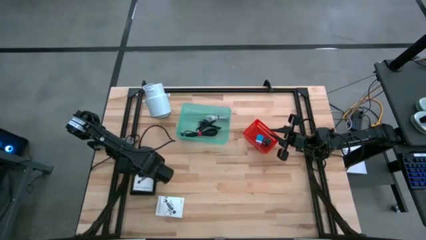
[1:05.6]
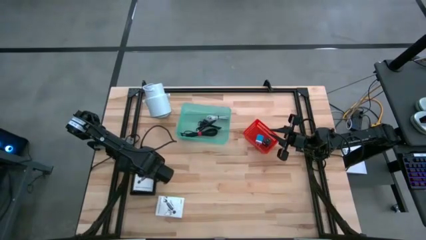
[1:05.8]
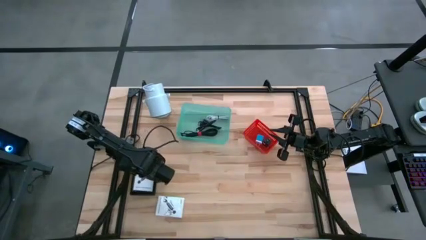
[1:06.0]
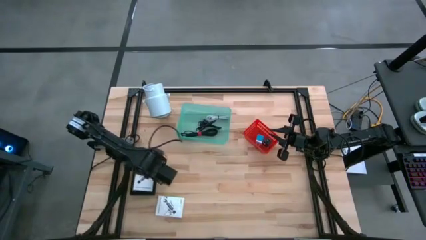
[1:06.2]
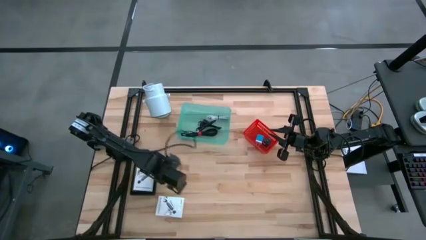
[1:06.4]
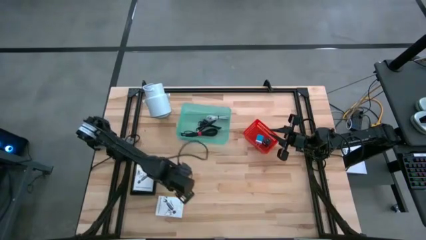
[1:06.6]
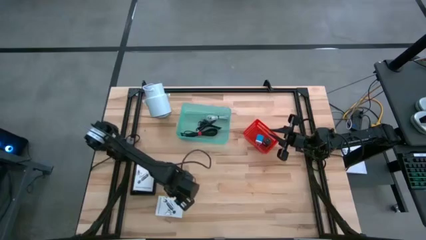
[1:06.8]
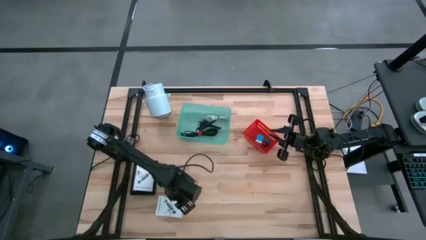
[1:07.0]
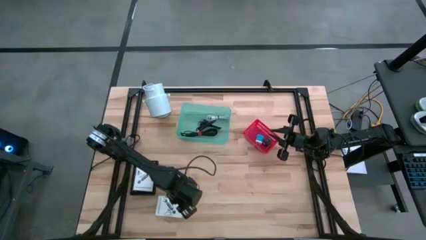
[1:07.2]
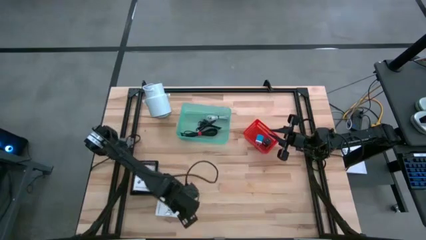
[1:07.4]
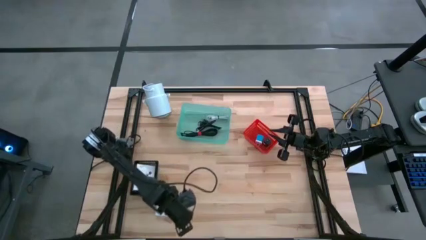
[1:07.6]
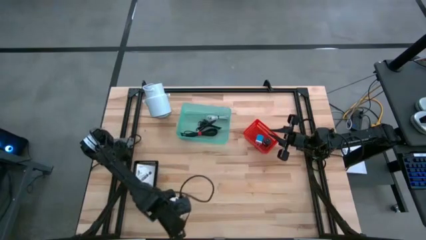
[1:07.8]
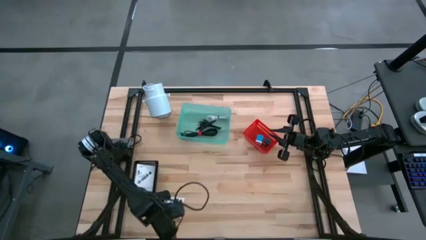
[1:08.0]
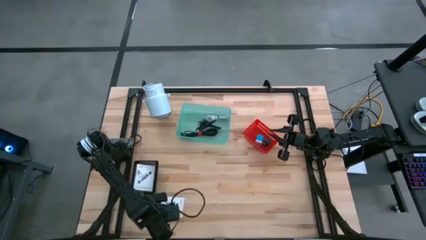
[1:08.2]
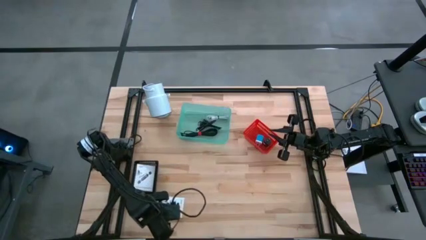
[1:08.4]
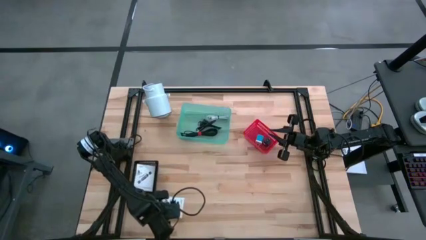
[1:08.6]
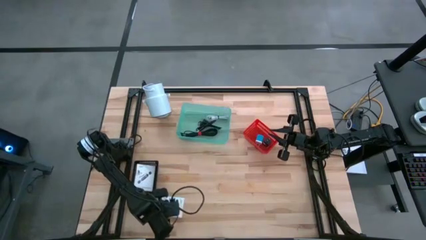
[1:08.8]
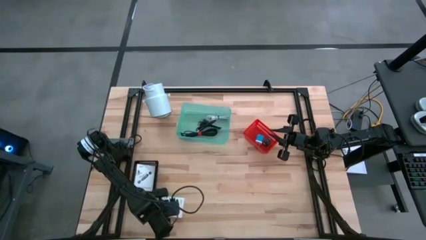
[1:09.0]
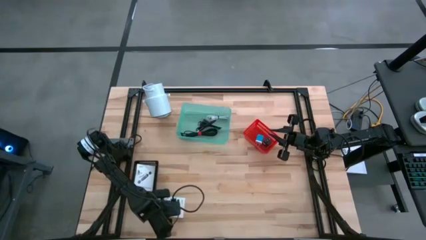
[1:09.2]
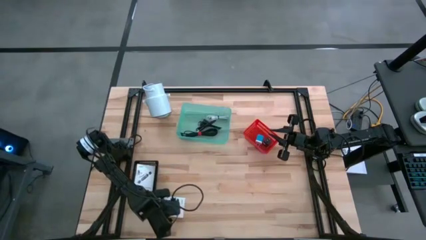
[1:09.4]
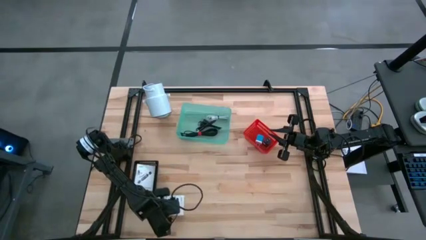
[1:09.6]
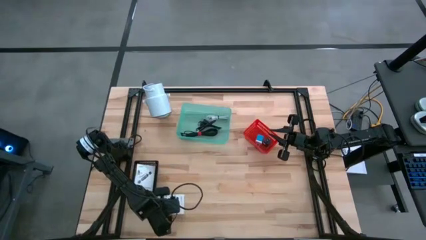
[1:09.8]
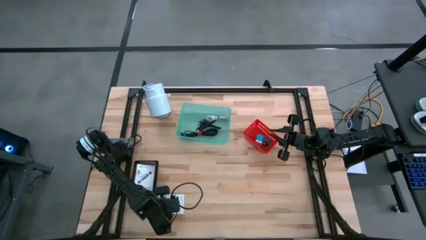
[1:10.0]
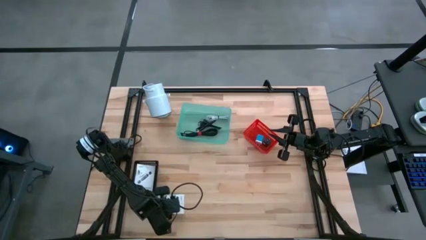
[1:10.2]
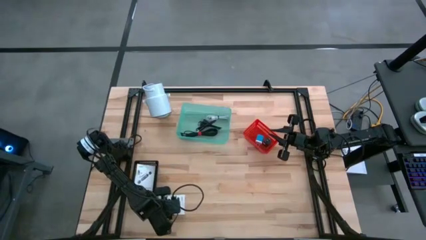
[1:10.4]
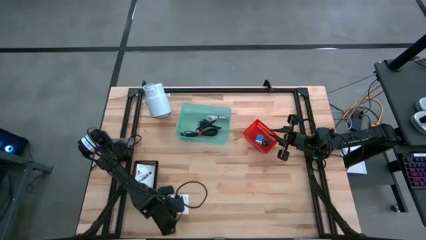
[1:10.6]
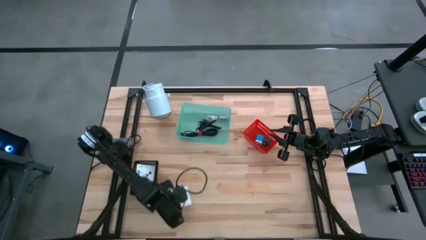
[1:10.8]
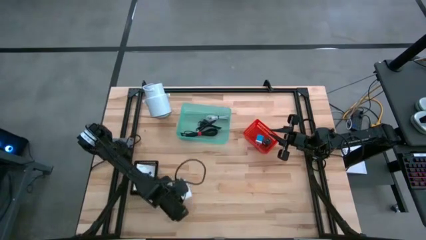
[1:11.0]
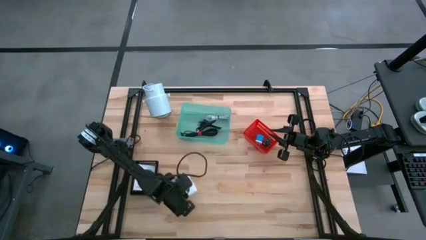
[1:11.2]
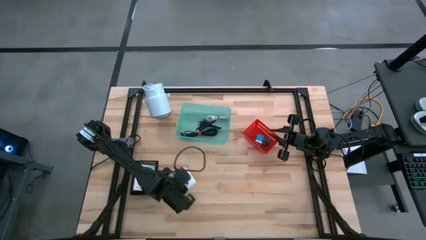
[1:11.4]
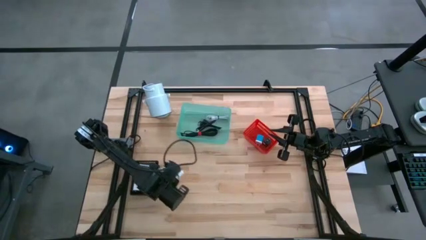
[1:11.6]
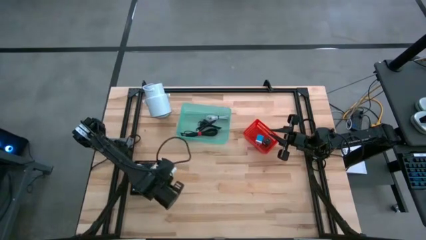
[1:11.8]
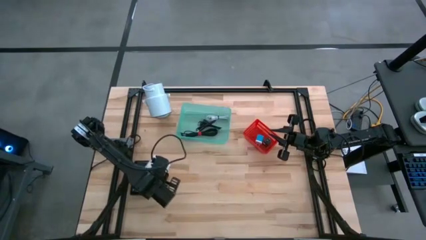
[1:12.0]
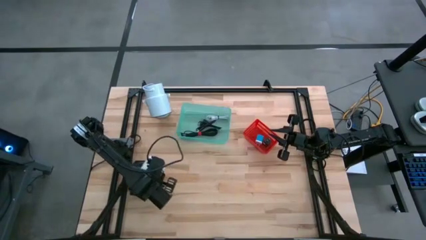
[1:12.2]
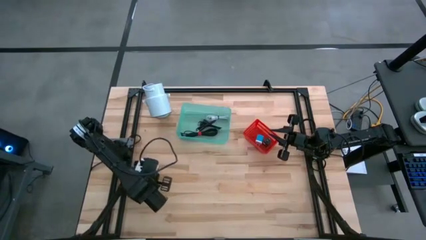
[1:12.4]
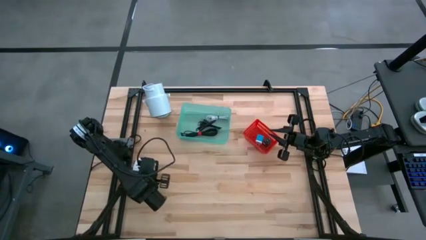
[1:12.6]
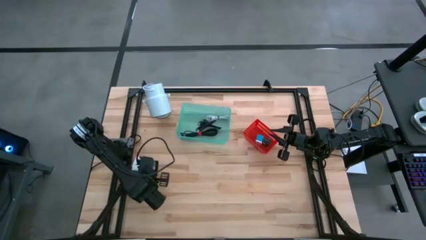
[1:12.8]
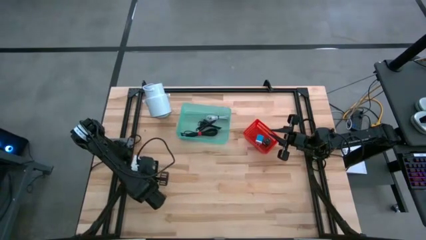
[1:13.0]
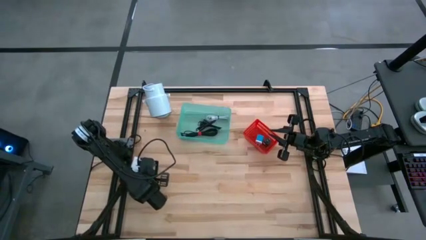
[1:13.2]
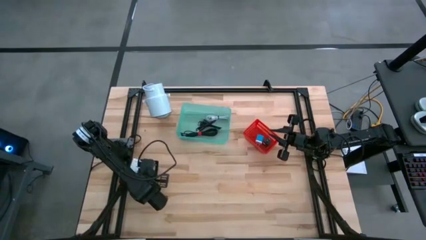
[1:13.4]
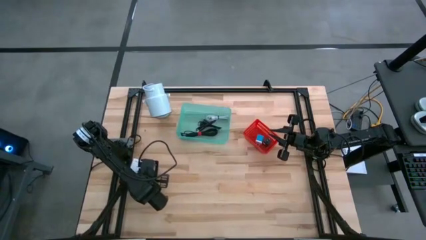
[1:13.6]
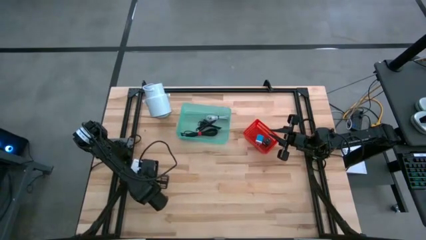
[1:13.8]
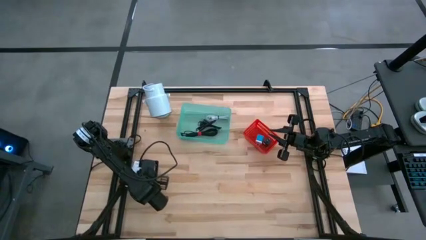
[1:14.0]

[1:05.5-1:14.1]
Task: Pick and place items into bin
Put the card reader box into the black bin

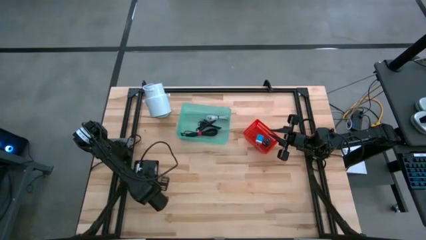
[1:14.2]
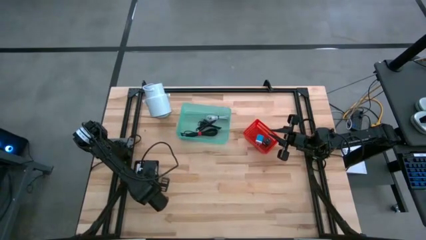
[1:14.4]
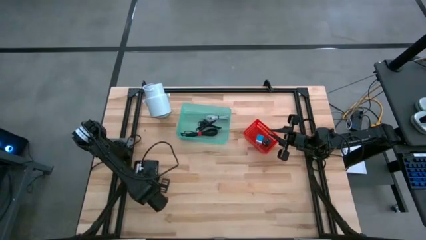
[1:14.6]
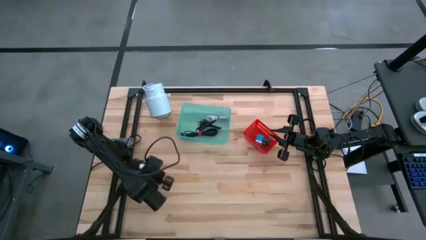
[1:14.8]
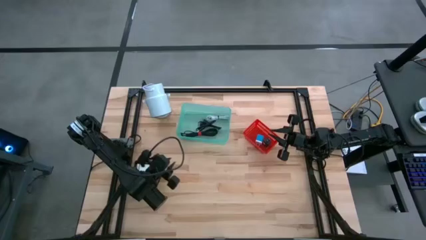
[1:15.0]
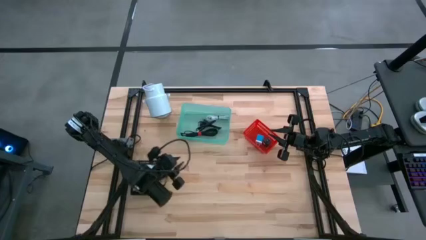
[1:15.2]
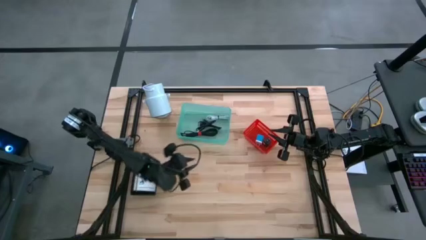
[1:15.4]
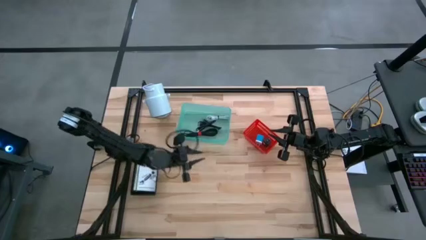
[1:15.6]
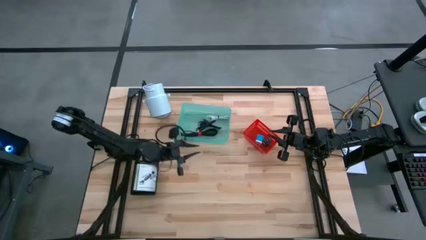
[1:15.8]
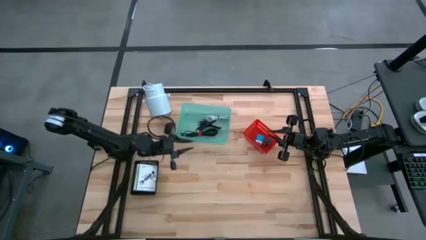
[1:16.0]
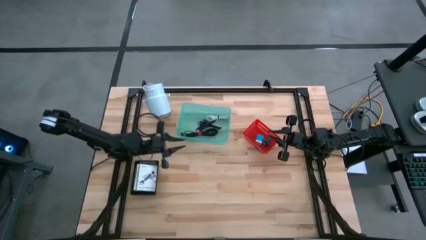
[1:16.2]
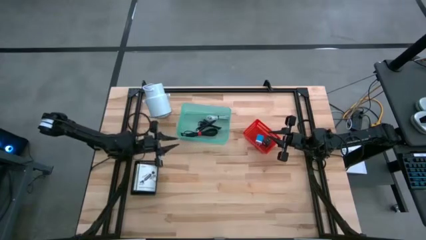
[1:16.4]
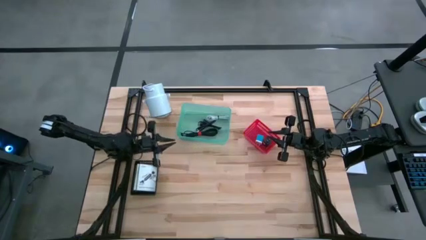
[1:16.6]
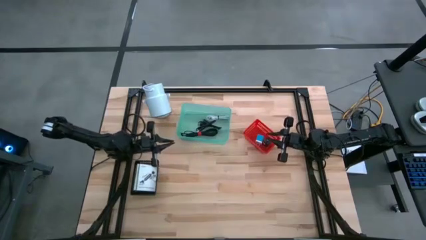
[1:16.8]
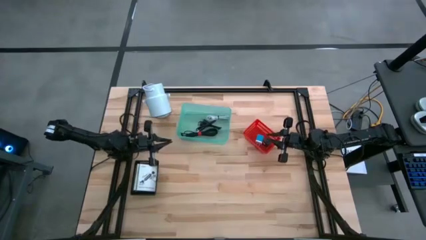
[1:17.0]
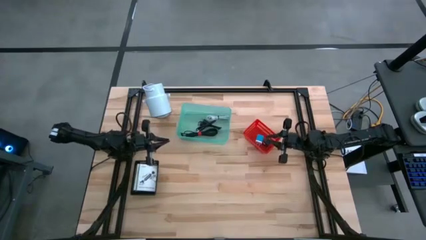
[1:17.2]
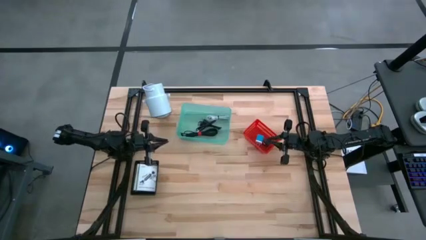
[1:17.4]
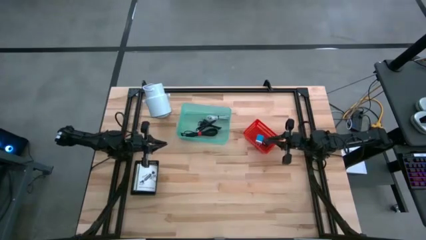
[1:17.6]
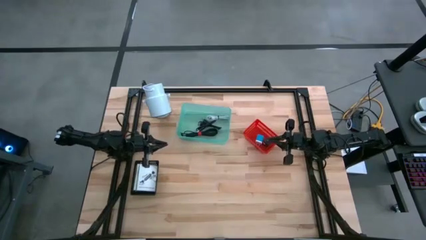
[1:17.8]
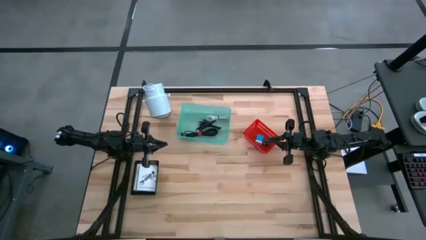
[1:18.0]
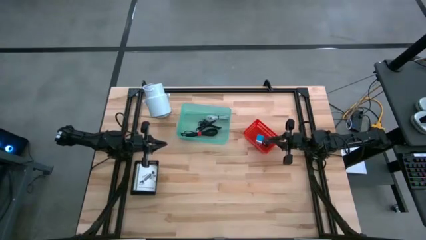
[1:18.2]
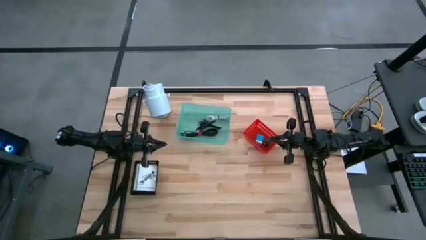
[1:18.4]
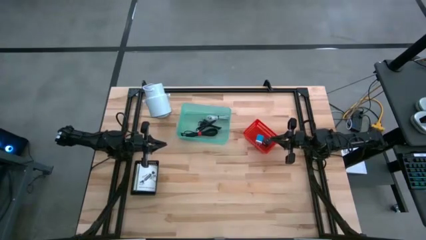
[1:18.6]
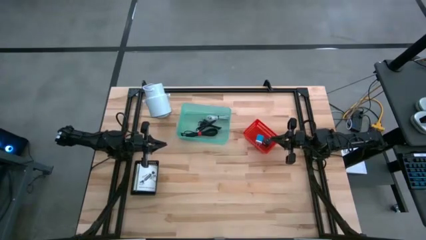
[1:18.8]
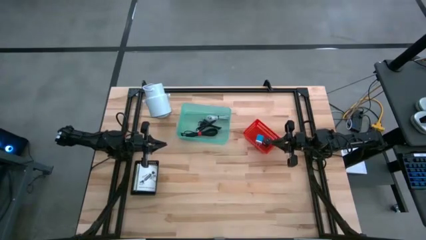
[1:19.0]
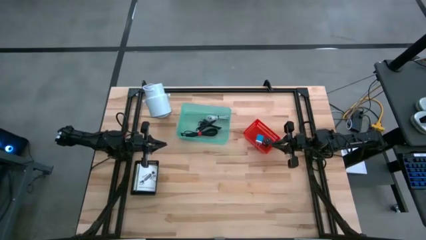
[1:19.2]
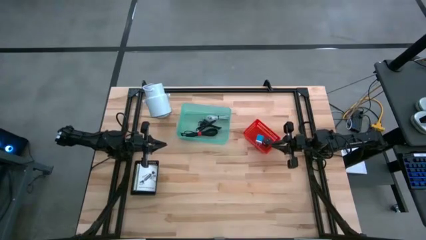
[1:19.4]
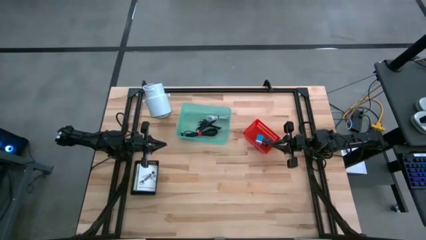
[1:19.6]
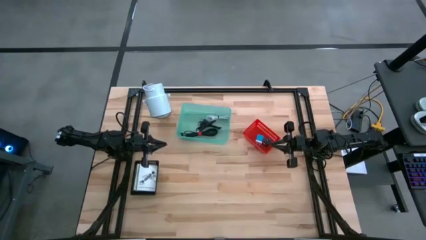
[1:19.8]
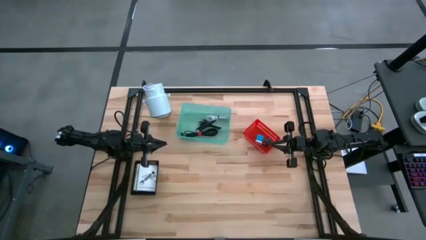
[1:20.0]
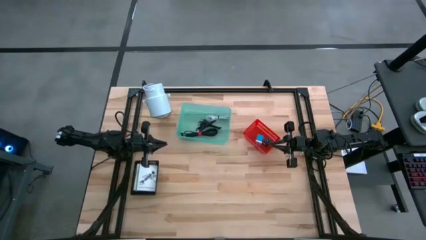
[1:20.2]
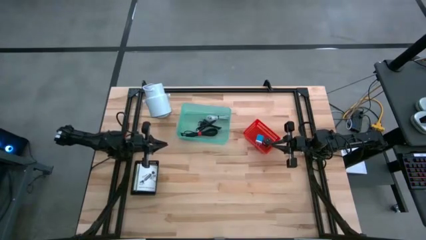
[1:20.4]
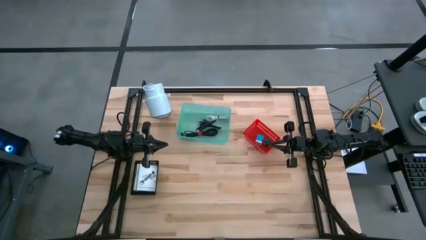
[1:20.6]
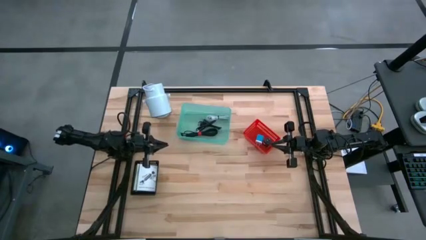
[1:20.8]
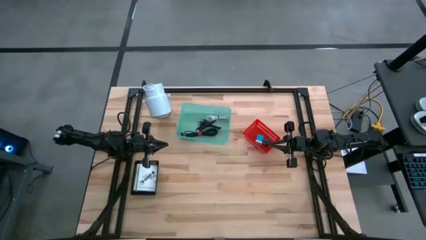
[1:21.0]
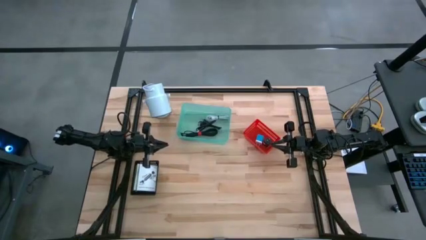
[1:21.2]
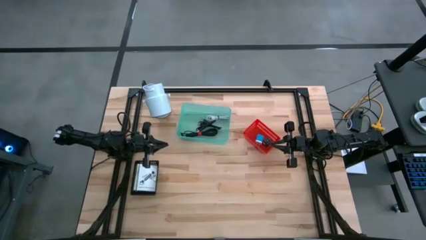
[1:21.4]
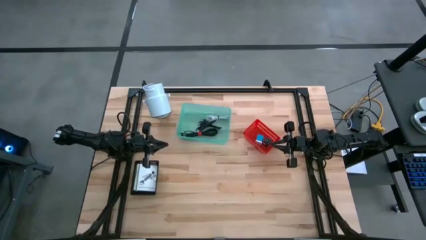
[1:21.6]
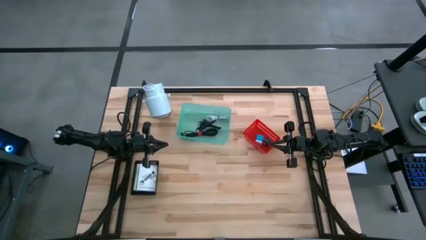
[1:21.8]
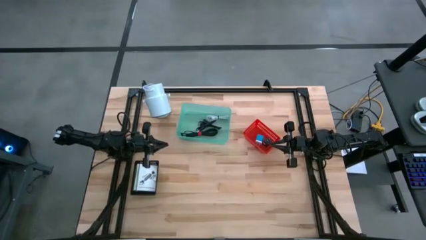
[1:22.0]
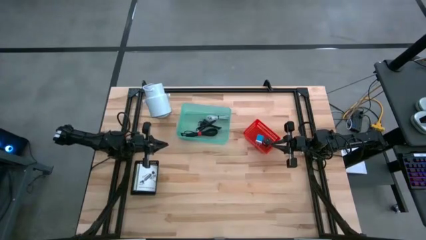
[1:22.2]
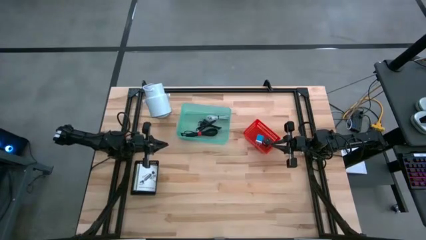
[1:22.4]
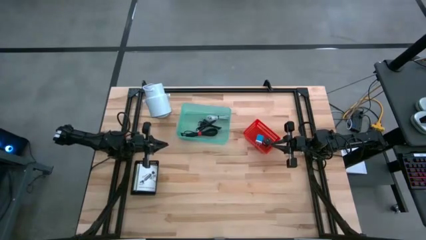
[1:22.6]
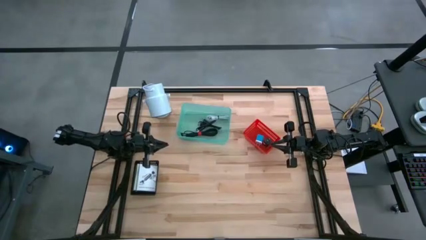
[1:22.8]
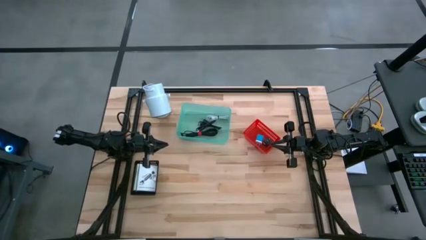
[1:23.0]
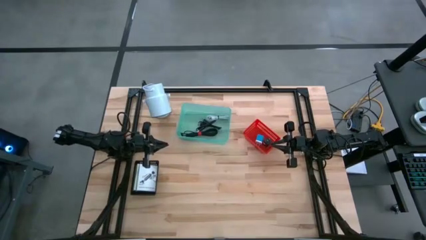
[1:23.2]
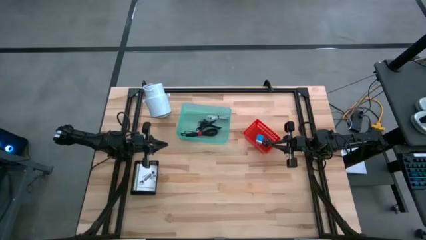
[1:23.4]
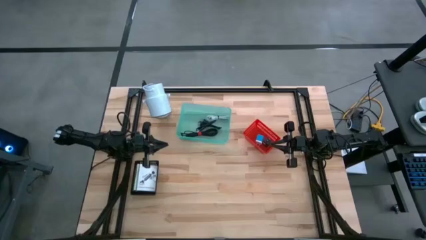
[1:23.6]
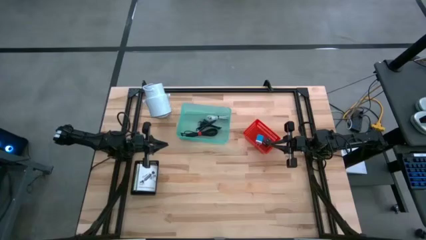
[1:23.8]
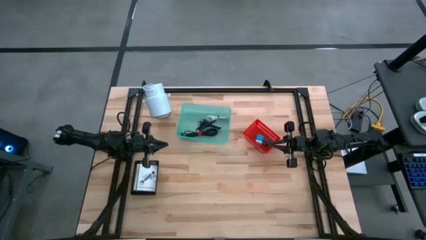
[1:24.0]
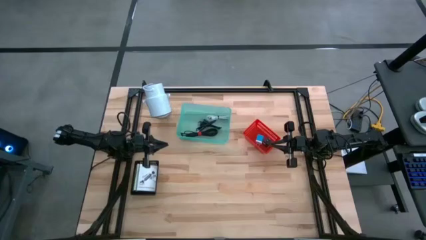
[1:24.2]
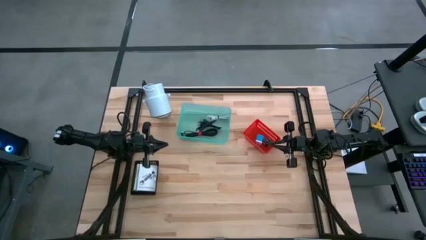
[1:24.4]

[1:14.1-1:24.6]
Return to Home Position
